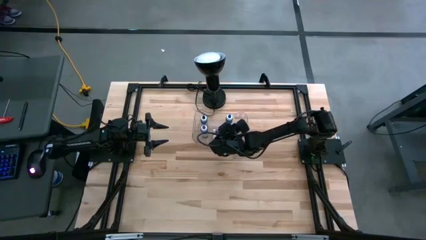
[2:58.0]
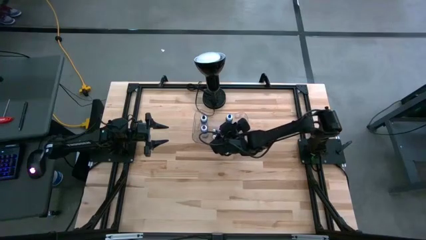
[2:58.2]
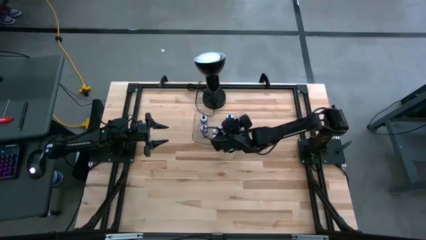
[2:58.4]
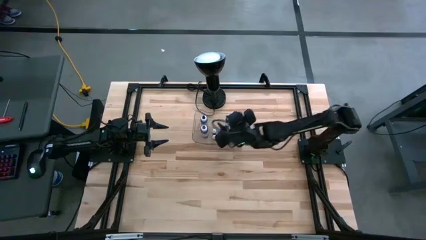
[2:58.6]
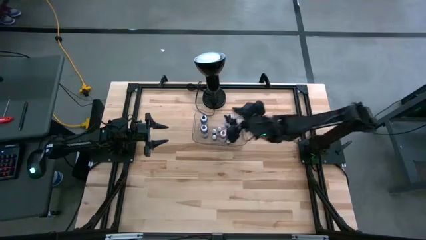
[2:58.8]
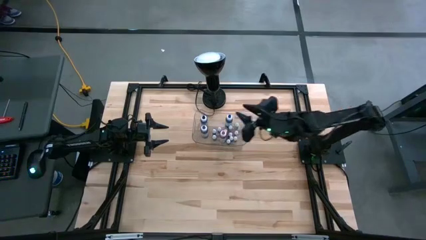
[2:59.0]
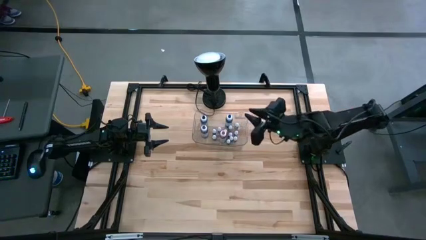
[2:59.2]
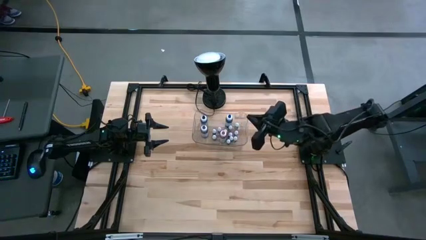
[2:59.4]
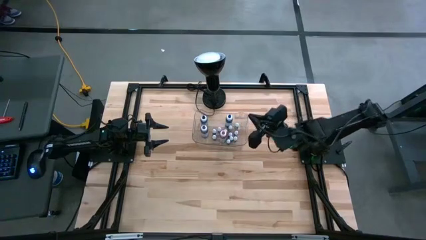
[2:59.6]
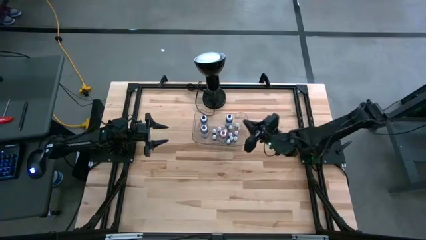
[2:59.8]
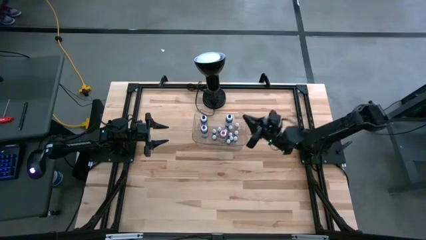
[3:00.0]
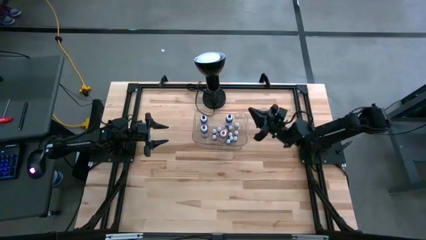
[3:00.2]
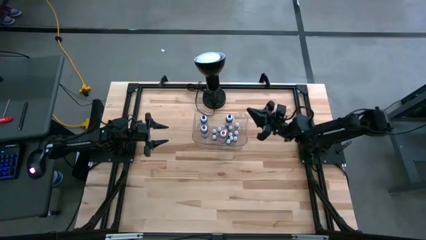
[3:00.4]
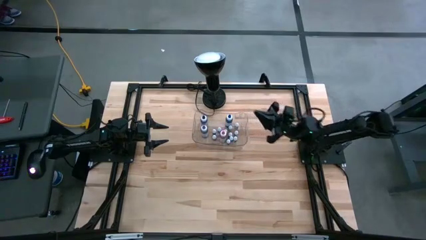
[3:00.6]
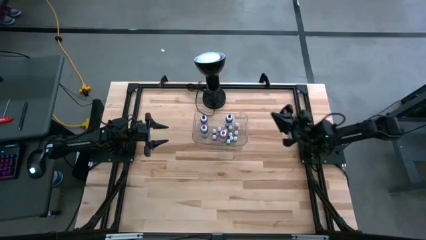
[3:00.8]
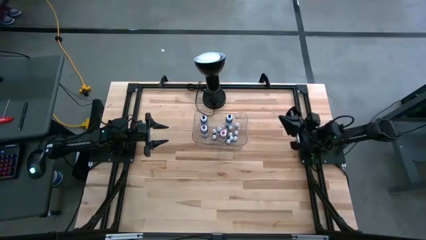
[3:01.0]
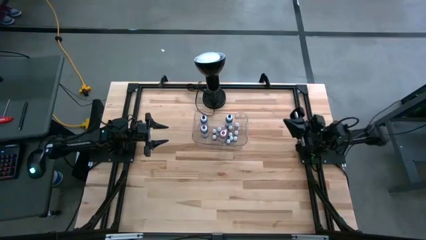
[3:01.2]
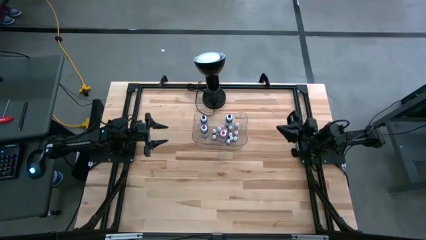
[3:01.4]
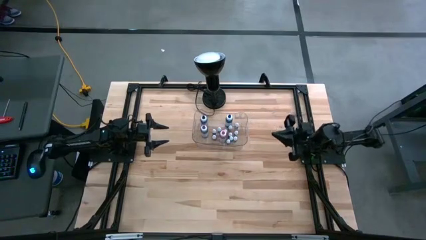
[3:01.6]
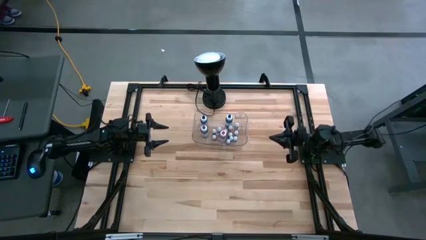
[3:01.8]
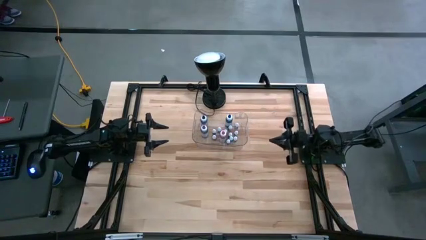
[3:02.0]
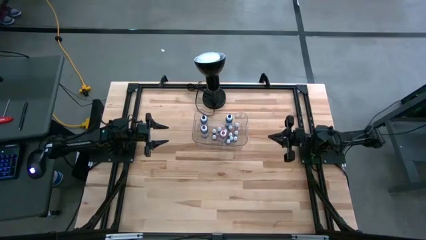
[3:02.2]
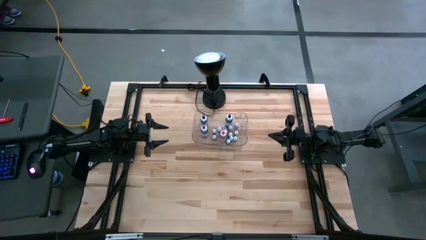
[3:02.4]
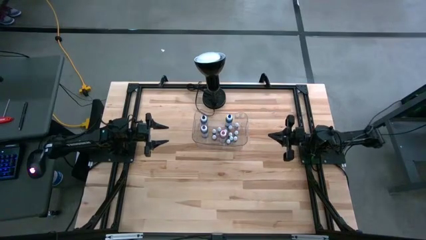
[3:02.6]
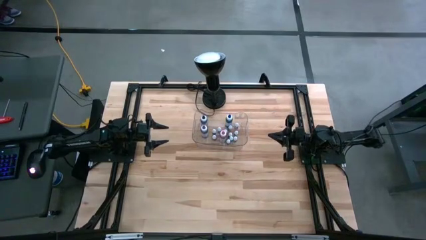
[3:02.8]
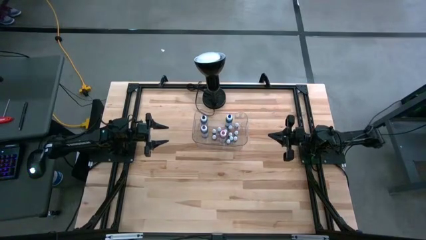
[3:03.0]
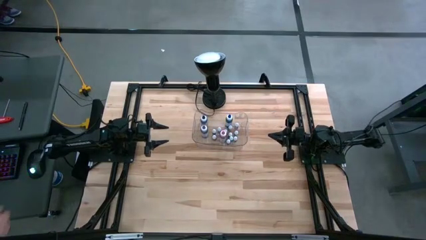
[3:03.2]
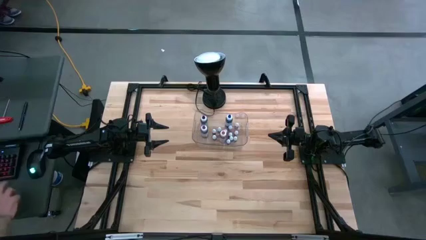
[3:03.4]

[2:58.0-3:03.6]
Task: Pick & Place food coloring
Return to Home Position

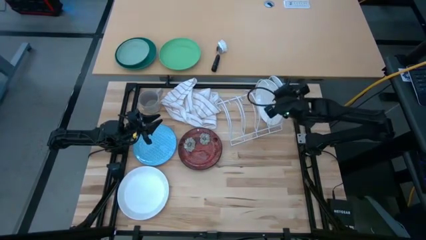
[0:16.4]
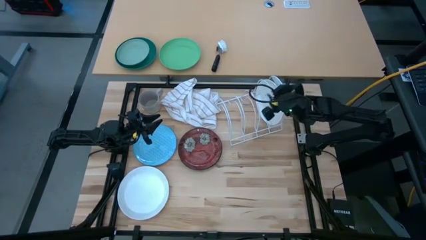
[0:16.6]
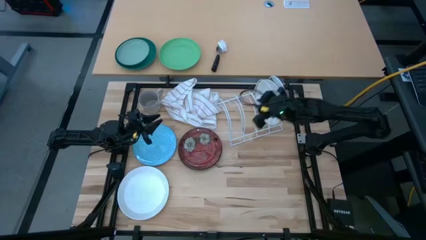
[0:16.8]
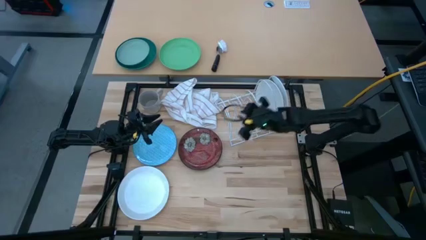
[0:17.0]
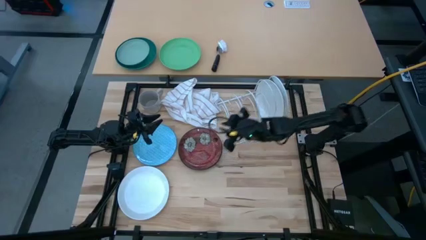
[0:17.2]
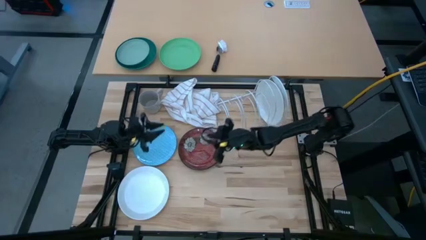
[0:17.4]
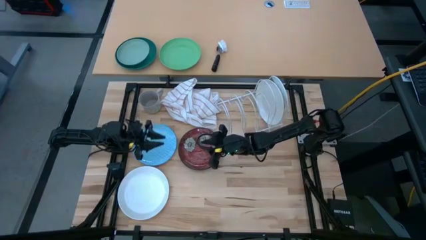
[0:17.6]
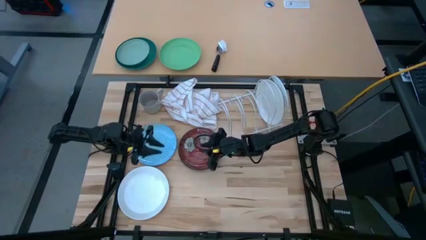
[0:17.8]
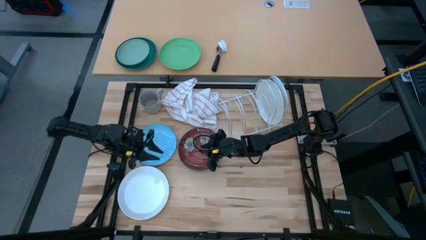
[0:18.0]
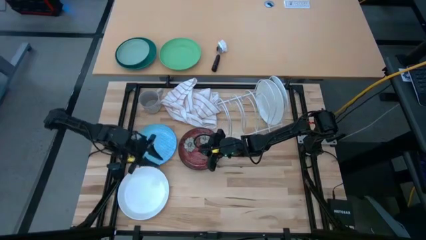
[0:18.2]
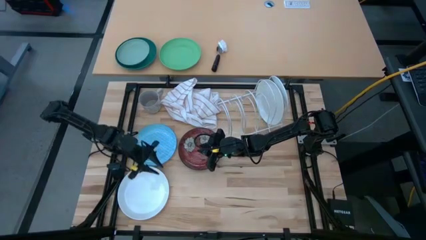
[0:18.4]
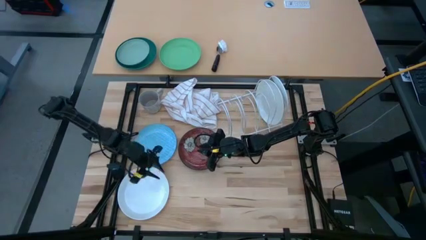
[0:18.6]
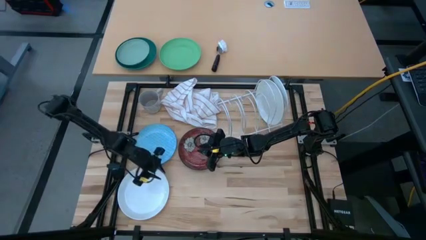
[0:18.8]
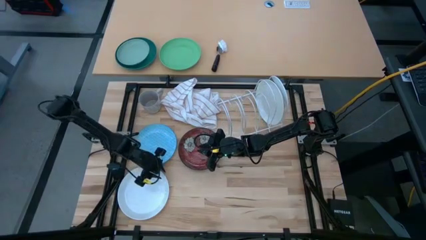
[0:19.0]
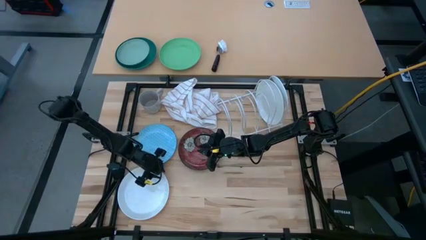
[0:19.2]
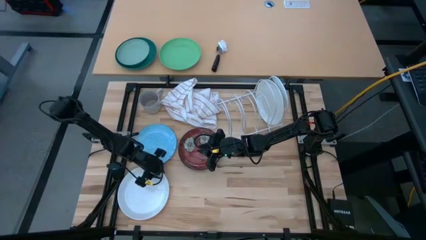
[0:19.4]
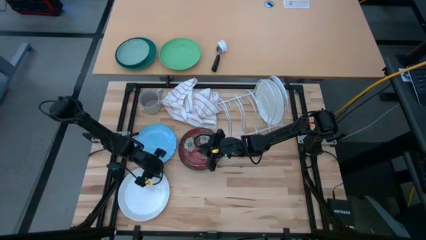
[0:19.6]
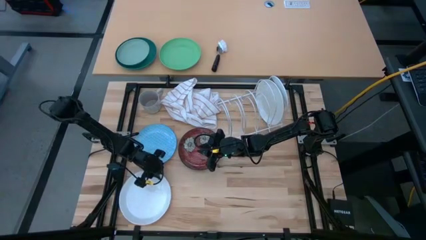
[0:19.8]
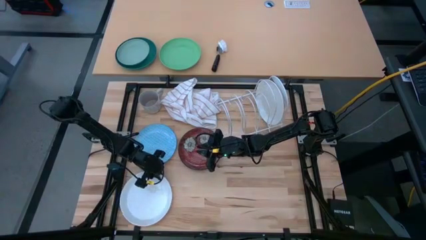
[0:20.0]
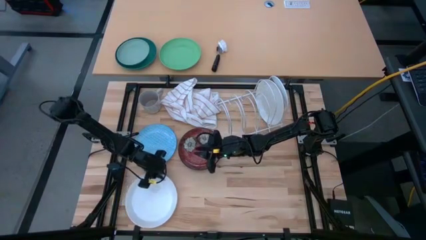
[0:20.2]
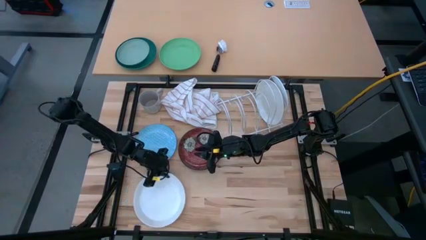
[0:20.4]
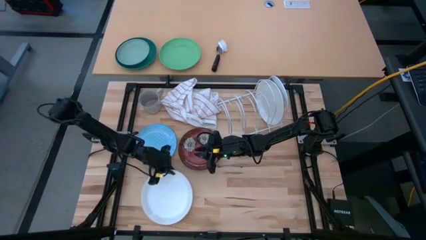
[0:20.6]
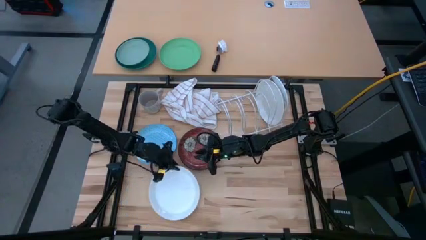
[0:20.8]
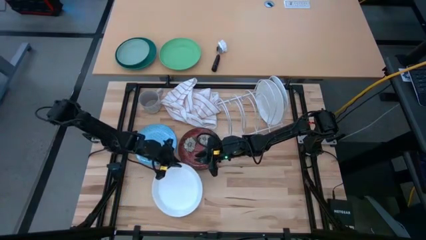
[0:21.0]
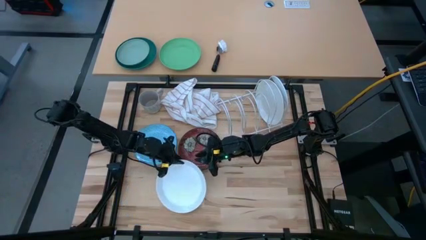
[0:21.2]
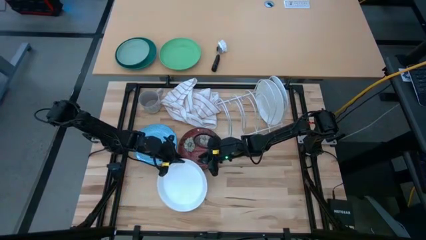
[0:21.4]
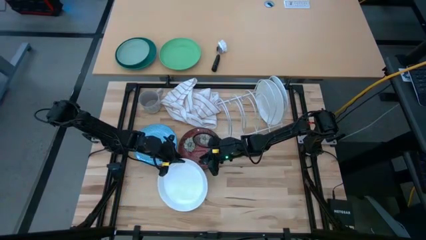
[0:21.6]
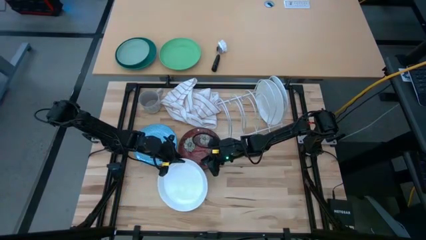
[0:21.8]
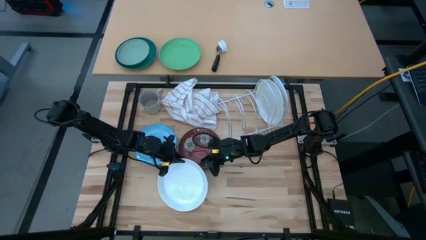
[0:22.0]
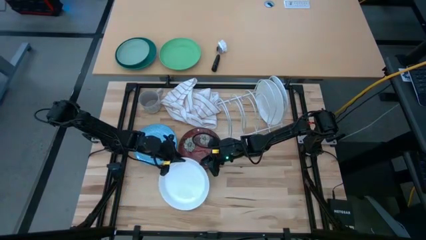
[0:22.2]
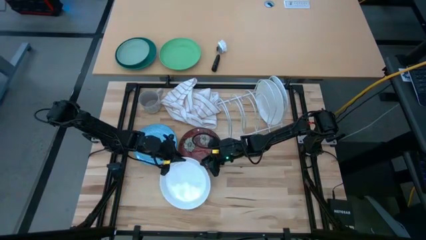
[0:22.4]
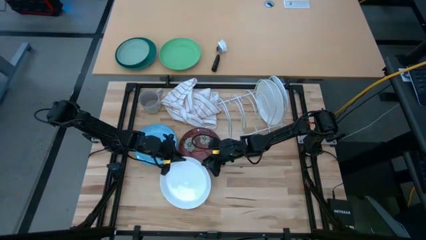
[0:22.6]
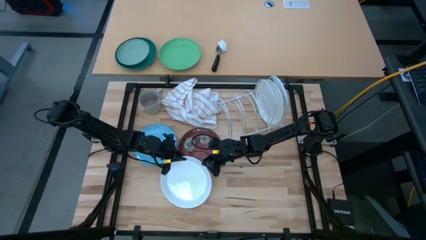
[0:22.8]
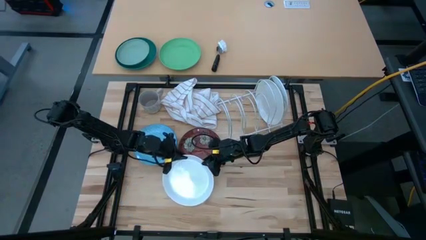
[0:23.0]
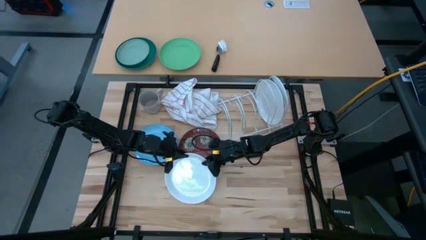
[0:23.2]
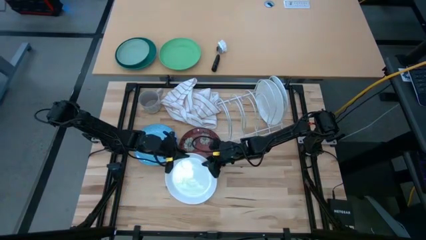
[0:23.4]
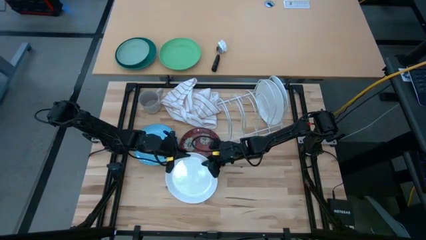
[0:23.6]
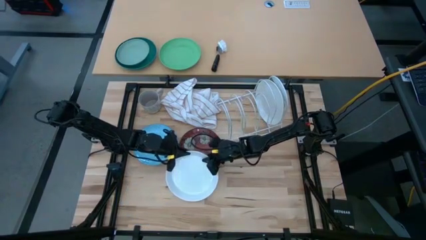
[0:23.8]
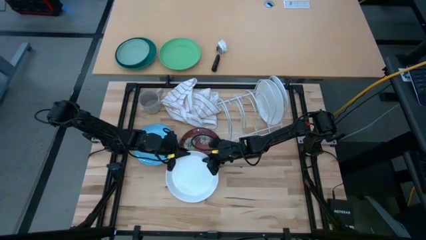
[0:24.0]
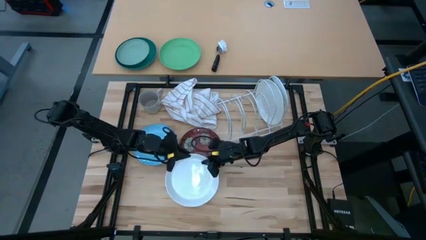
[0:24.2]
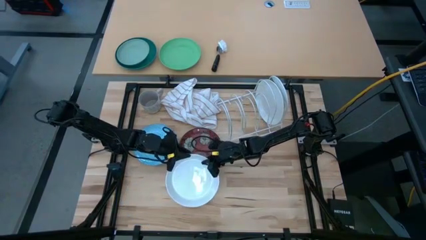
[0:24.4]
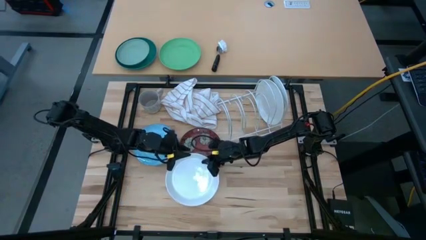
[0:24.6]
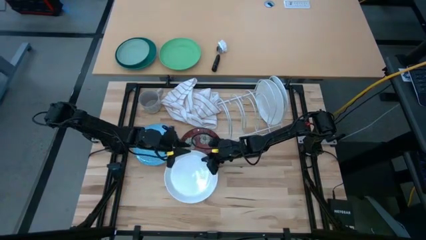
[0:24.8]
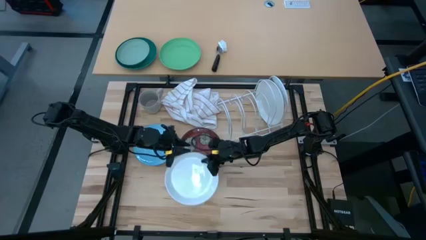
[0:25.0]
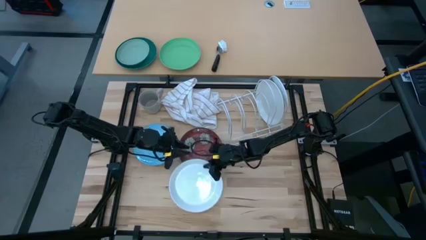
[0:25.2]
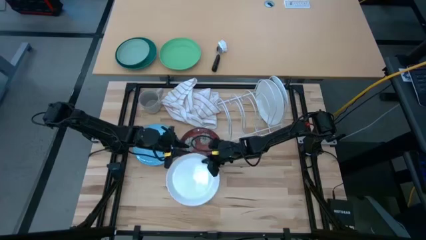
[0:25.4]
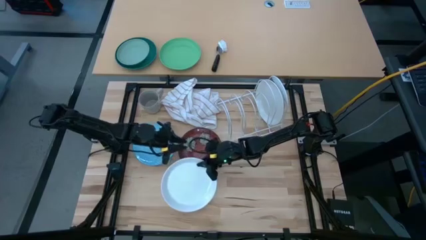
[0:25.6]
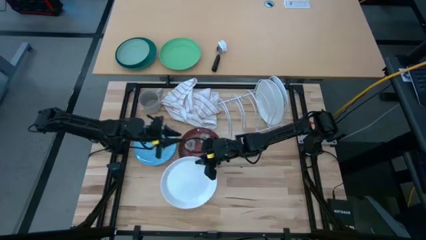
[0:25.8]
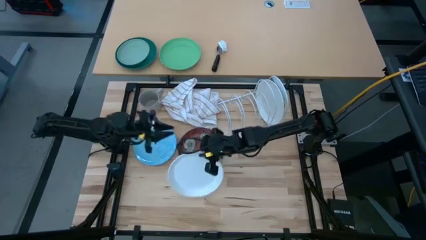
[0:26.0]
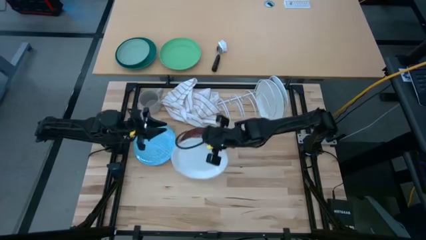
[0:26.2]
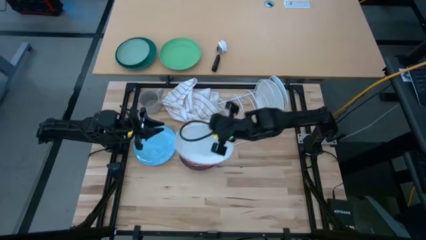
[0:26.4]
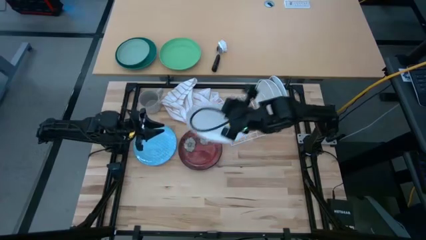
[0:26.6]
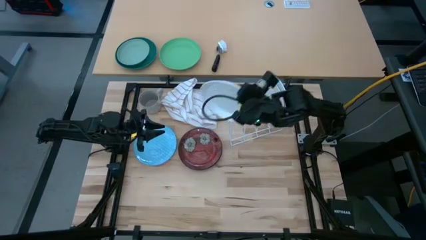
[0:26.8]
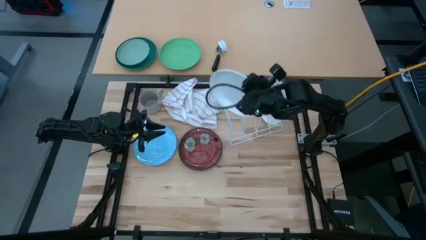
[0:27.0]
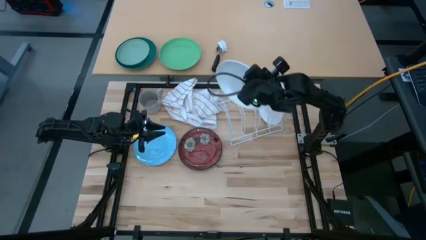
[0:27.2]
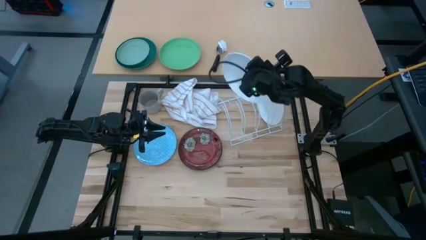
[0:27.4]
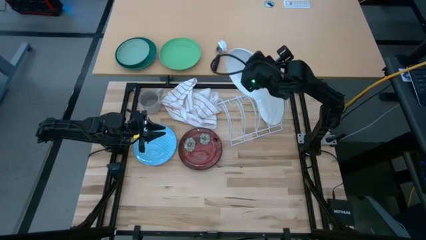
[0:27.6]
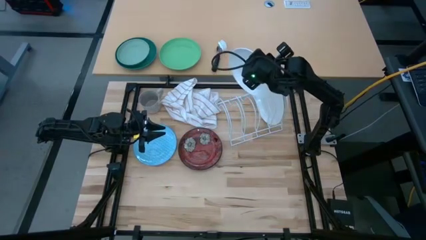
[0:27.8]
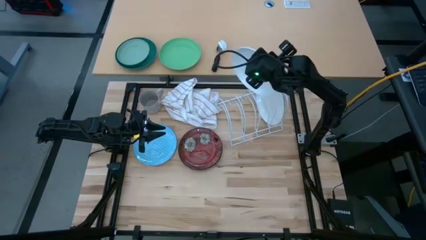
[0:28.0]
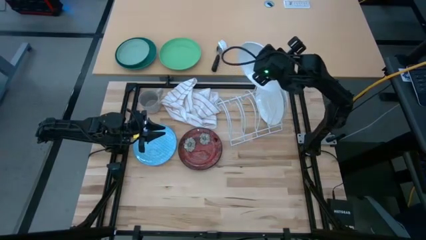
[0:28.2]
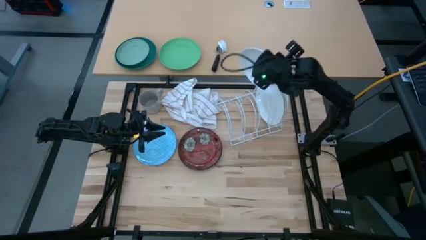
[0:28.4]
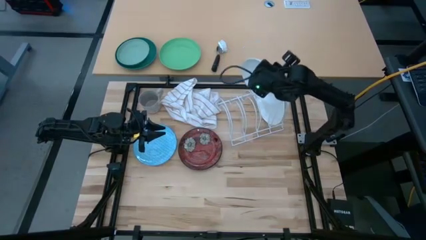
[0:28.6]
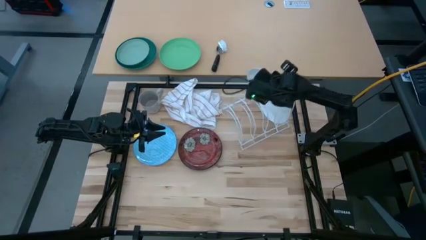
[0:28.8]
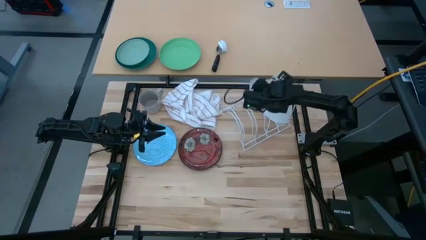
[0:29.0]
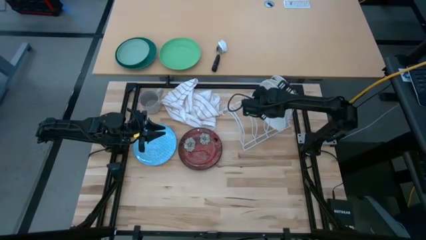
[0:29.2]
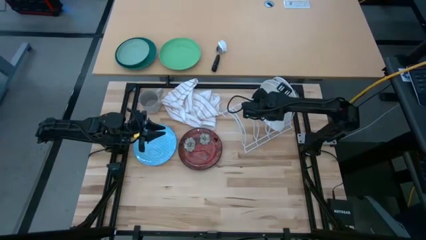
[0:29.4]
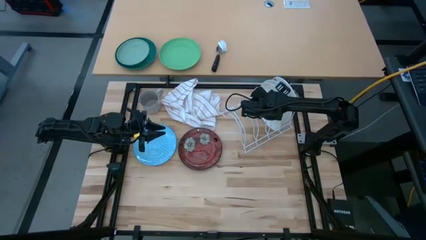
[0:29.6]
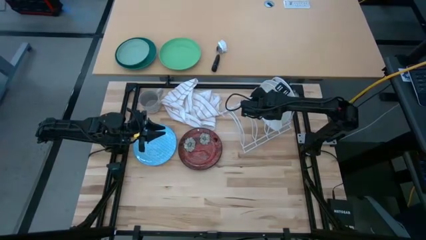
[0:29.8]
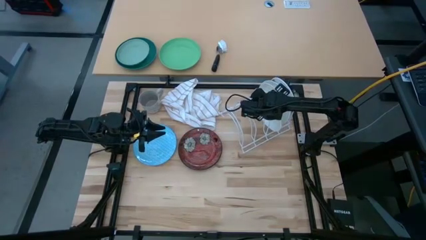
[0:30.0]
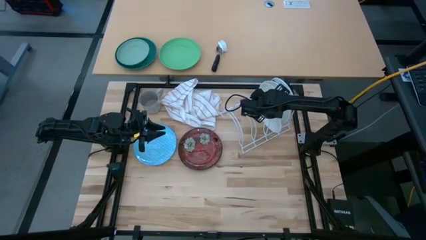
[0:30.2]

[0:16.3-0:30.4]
Task: Sort dishes
Put the white plate into the white dish rack
